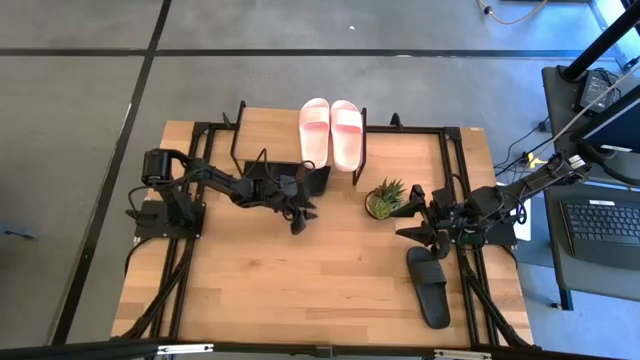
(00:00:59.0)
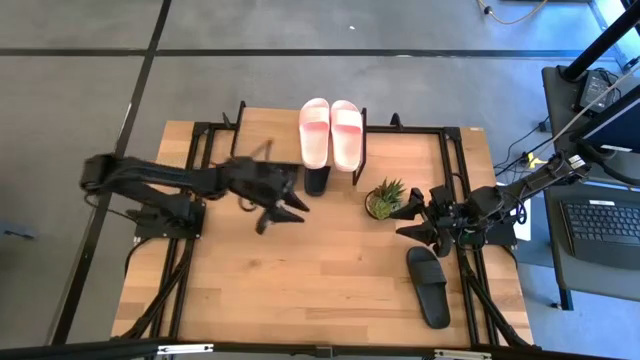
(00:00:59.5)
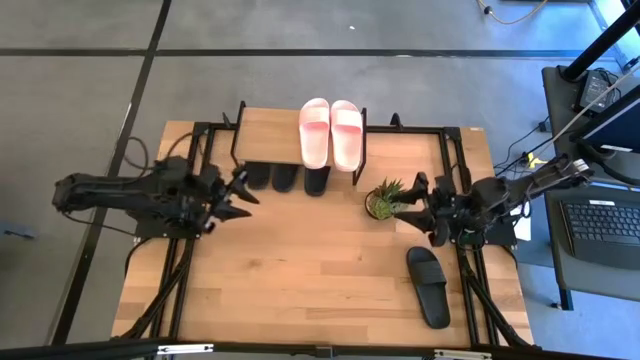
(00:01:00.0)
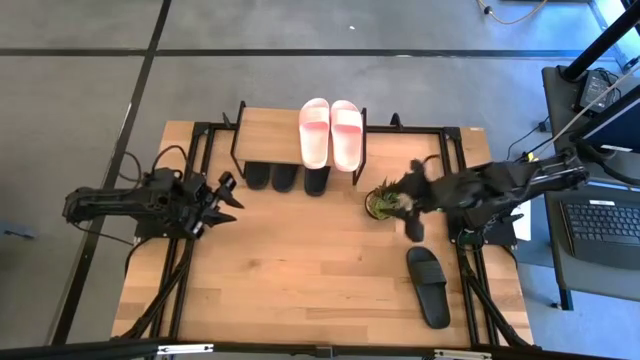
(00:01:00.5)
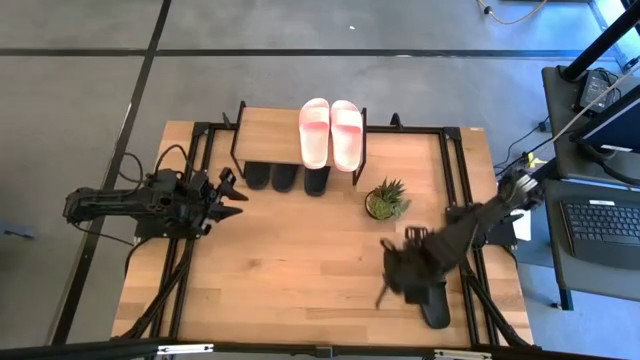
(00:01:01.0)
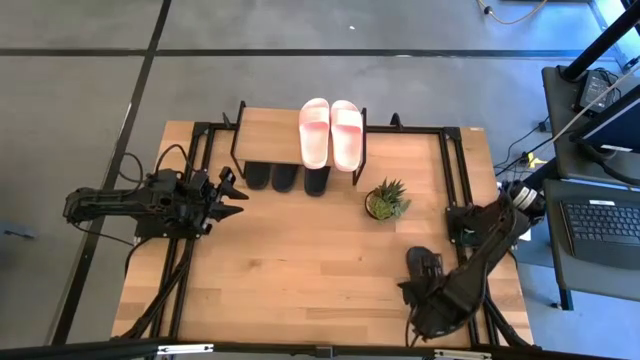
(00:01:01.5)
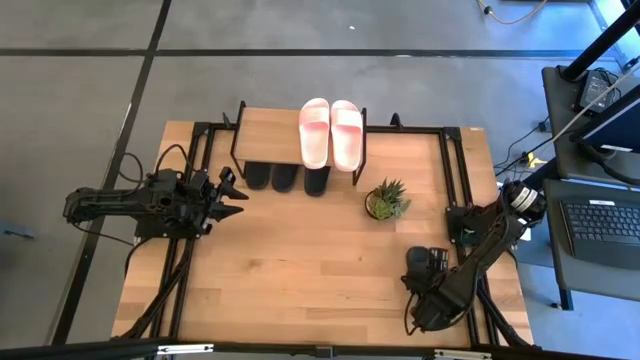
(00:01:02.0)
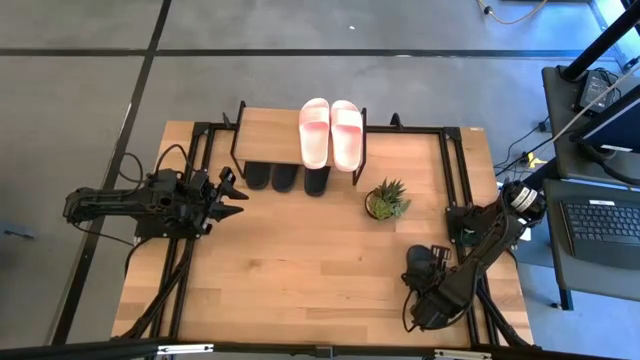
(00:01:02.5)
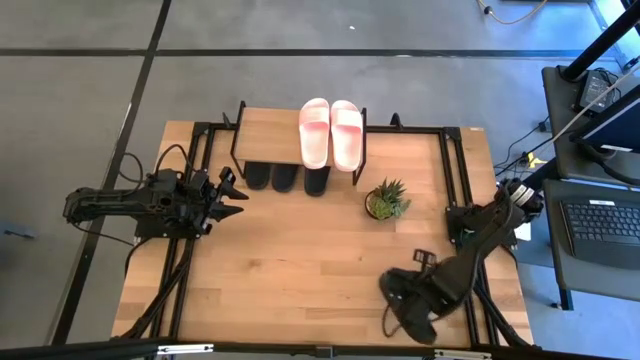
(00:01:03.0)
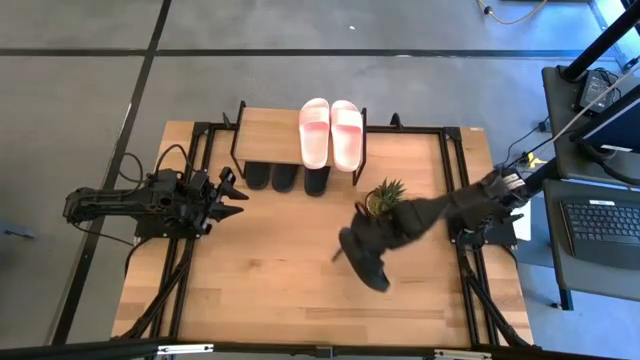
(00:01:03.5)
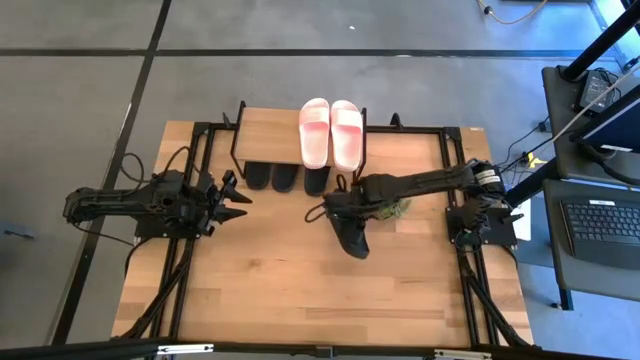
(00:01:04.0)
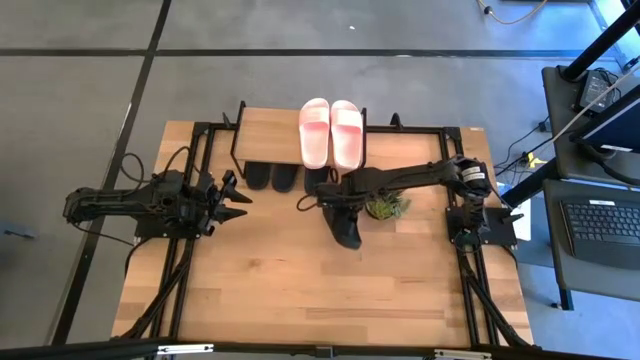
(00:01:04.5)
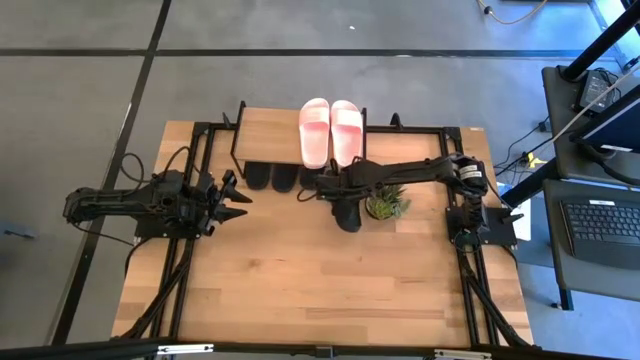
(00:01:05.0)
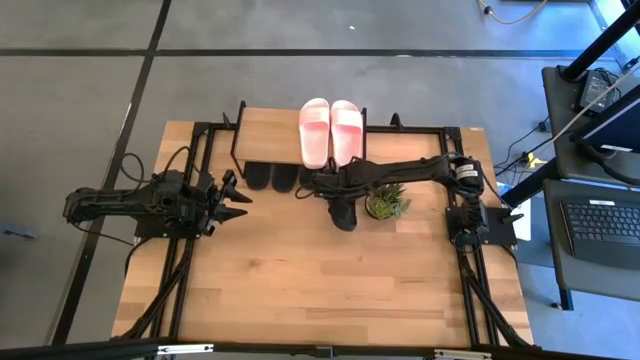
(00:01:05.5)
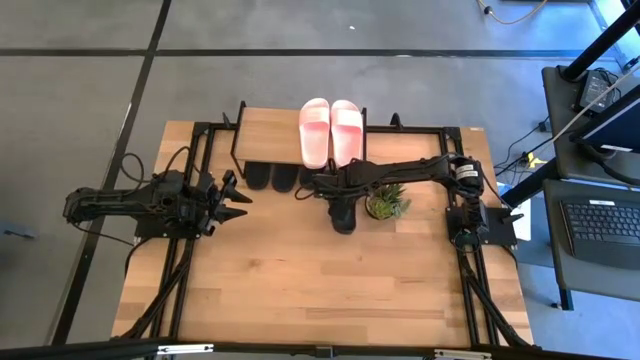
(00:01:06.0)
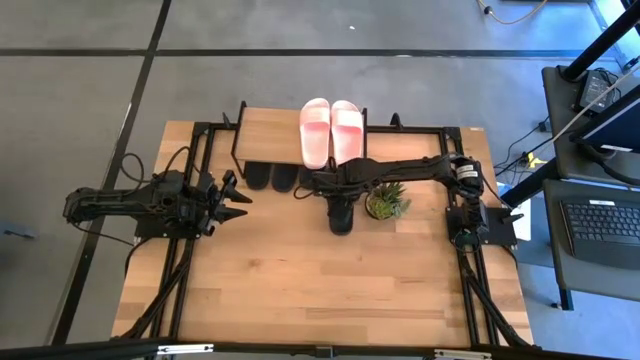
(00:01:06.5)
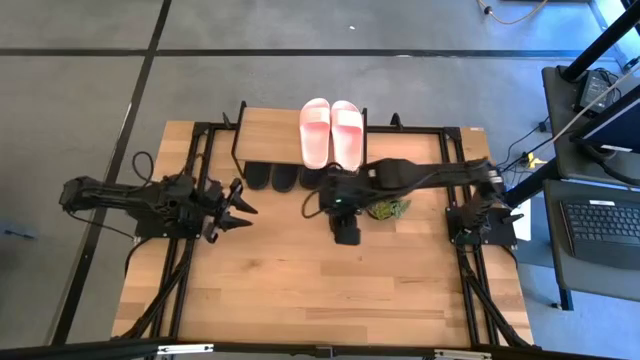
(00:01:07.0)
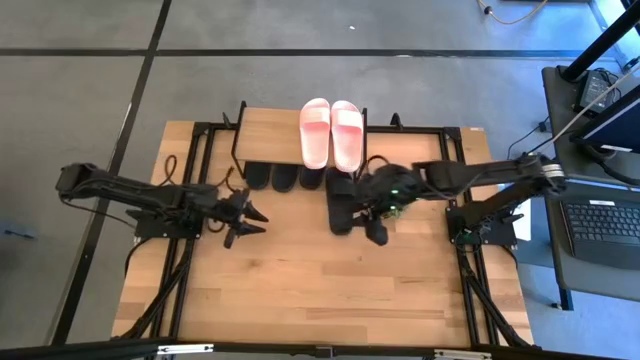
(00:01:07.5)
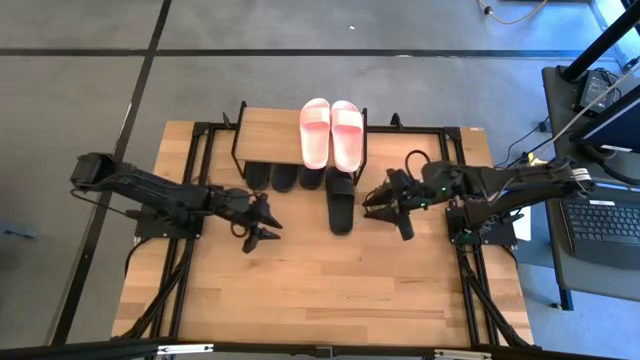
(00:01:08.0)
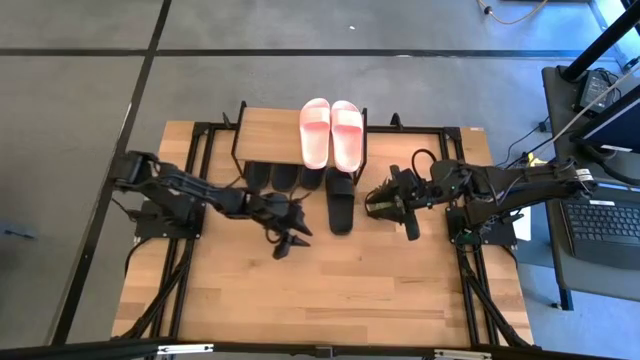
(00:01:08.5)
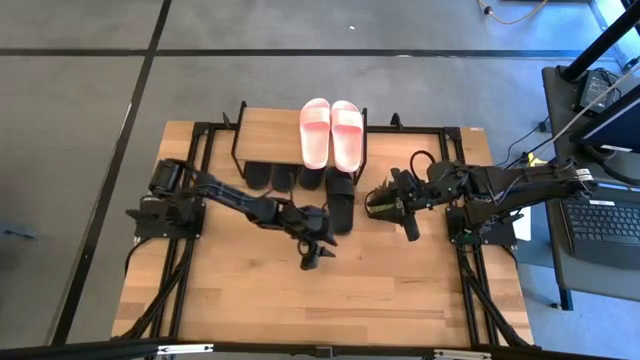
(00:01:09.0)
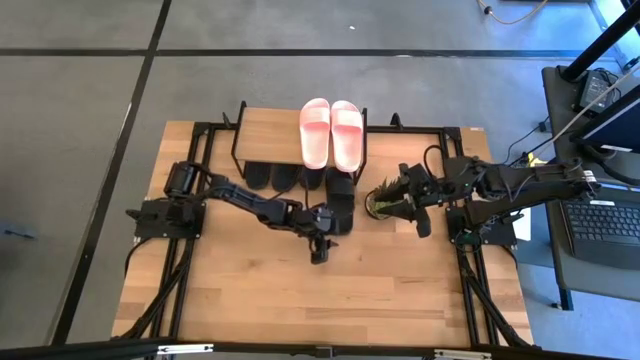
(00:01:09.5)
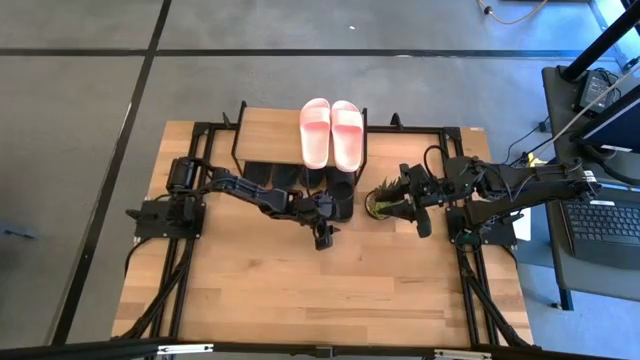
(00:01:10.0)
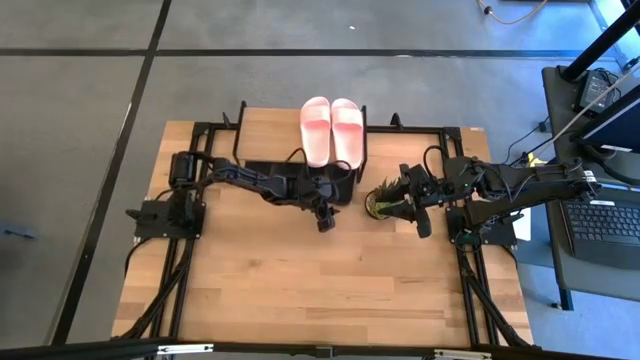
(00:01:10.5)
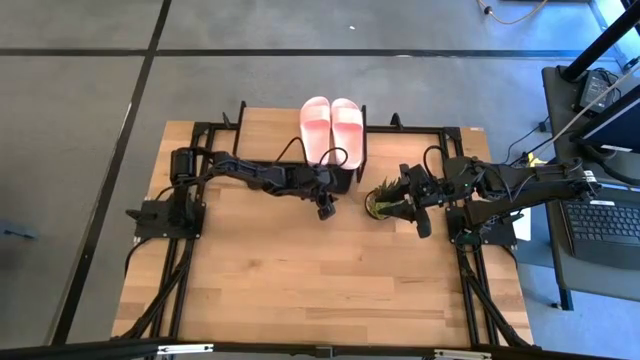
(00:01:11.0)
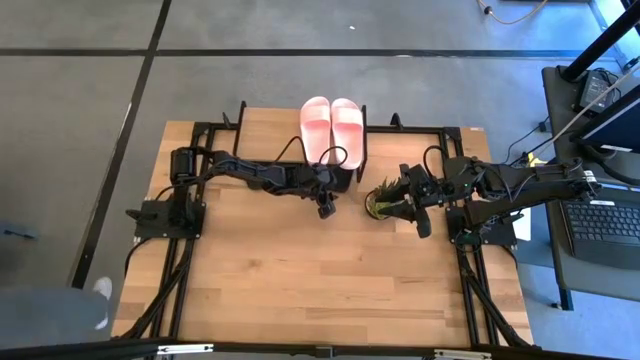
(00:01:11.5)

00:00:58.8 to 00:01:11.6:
Task: Pick and place slides into the shelf
Put the black slide under the shelf

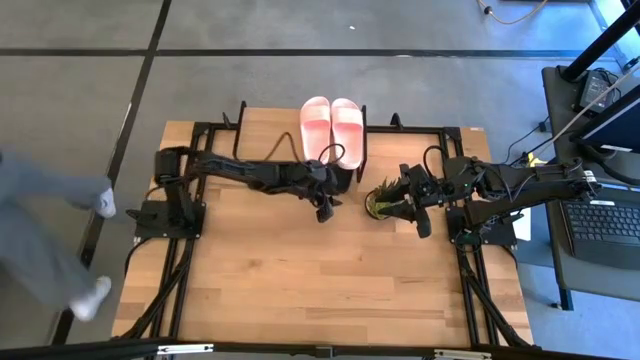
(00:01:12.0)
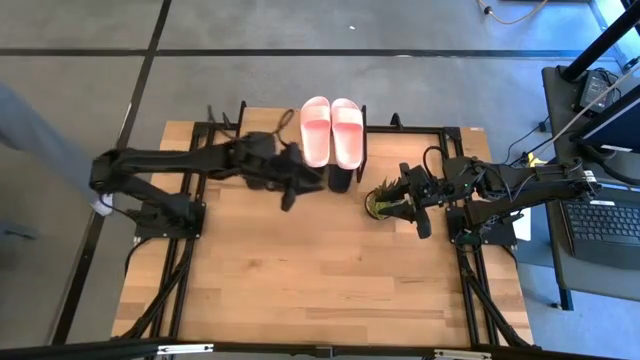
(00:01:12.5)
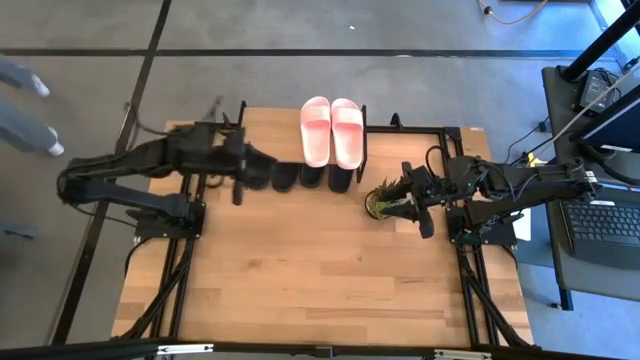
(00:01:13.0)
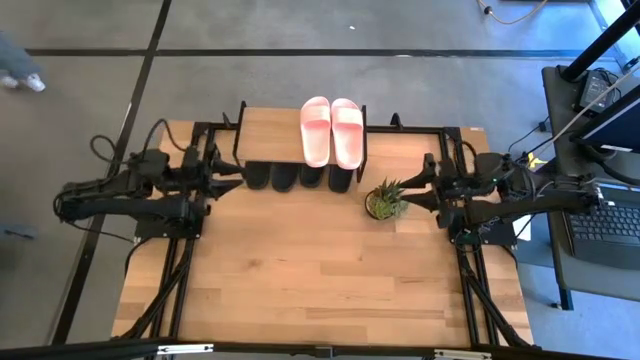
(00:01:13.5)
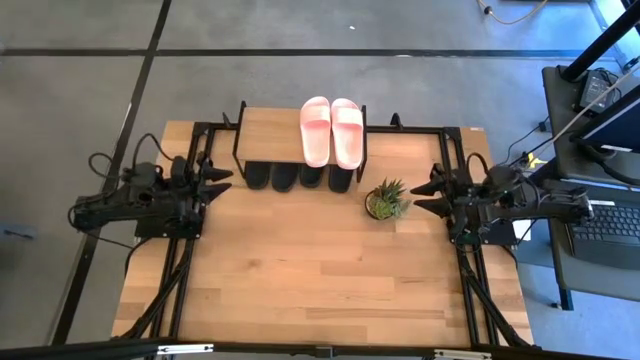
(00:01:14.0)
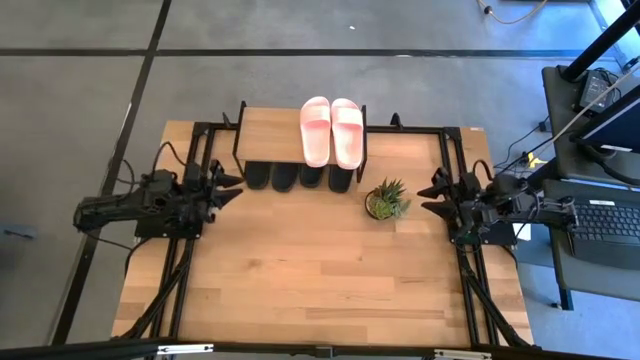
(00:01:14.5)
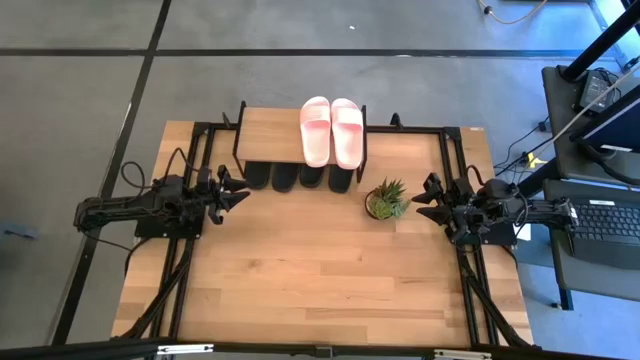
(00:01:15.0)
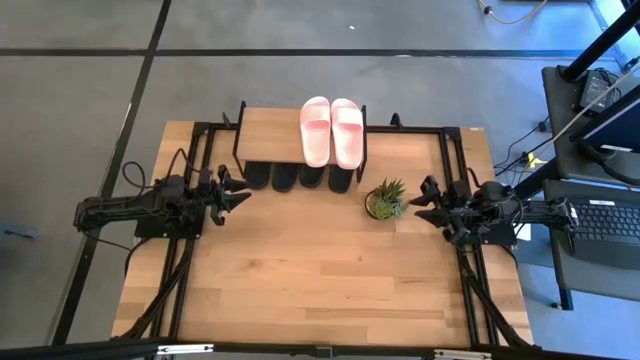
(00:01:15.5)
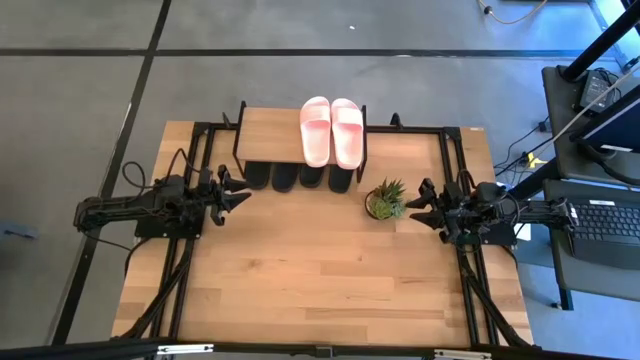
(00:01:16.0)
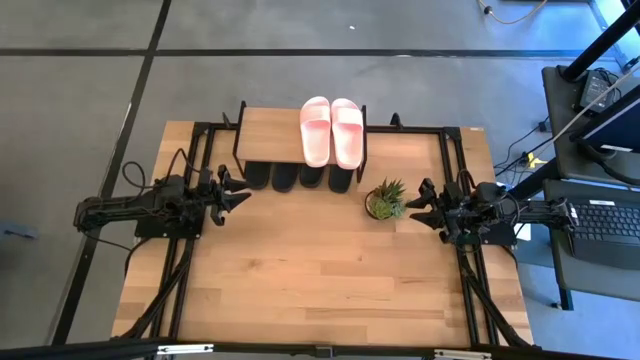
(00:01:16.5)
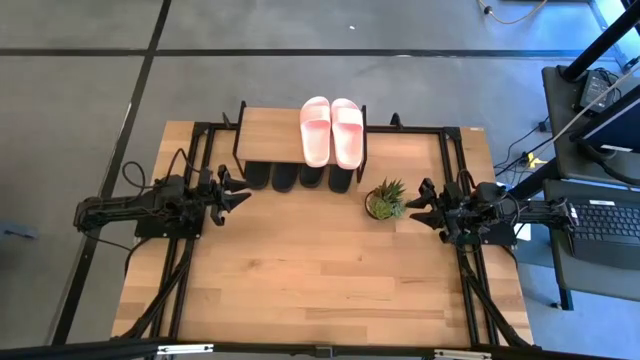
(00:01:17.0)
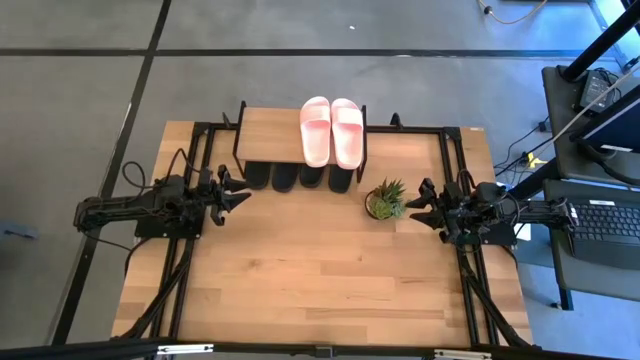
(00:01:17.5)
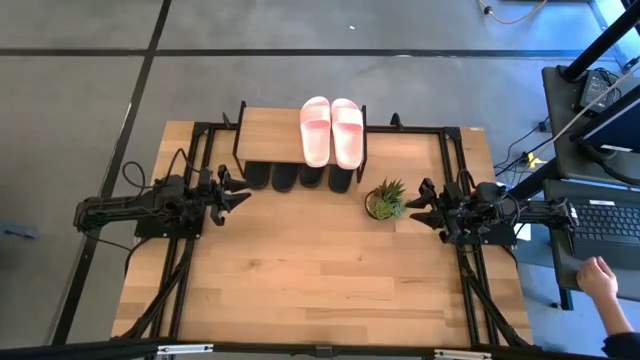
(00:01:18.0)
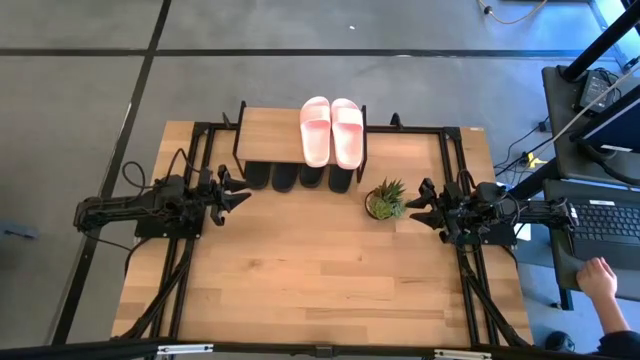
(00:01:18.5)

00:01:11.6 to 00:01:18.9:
Return to Home Position
